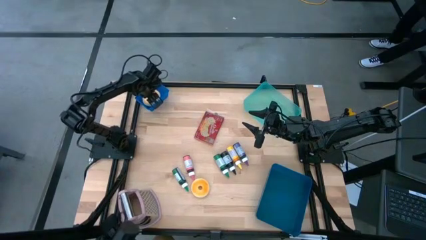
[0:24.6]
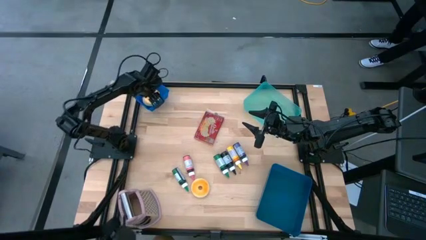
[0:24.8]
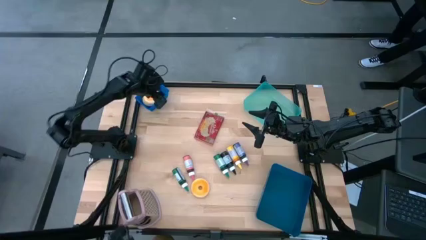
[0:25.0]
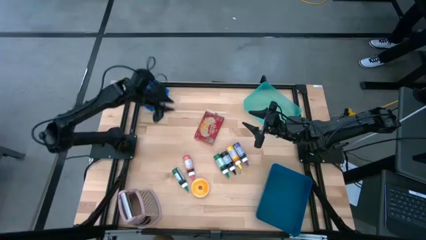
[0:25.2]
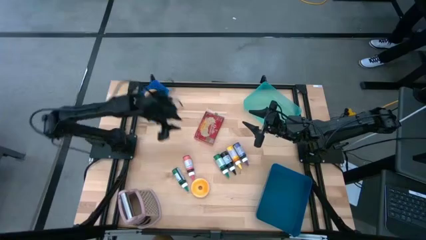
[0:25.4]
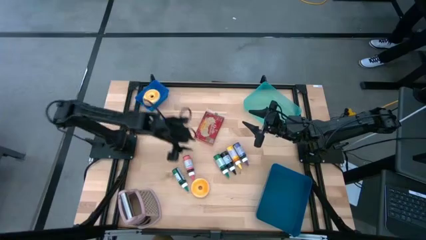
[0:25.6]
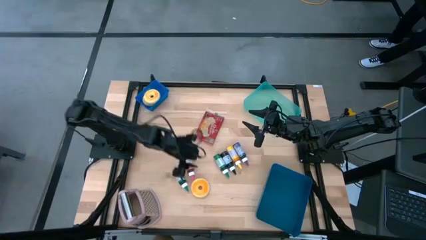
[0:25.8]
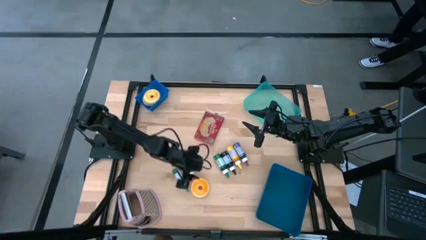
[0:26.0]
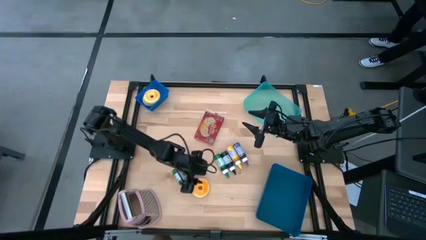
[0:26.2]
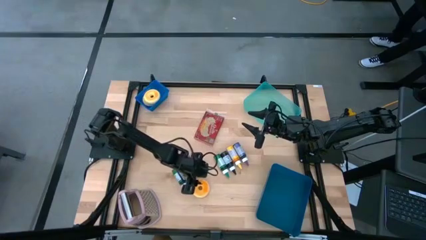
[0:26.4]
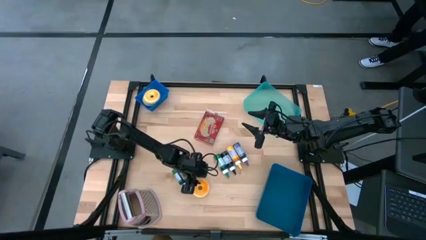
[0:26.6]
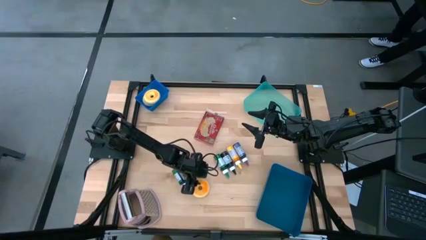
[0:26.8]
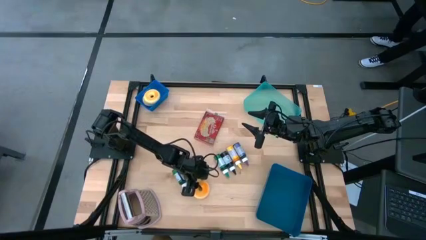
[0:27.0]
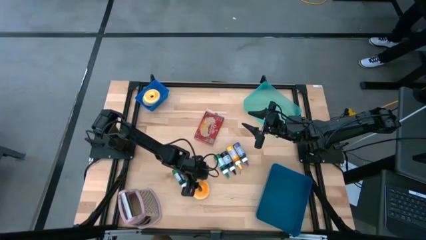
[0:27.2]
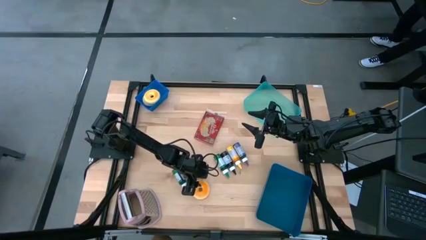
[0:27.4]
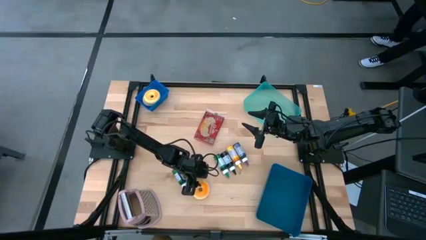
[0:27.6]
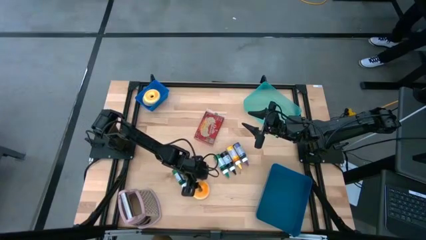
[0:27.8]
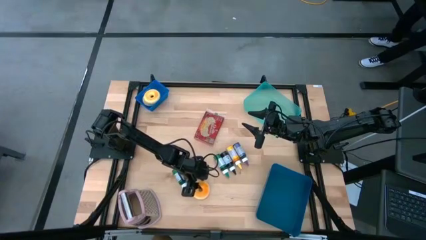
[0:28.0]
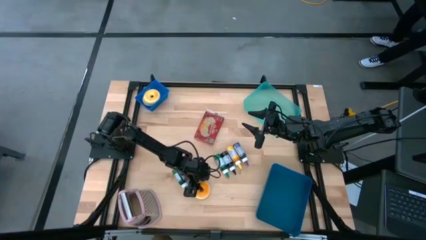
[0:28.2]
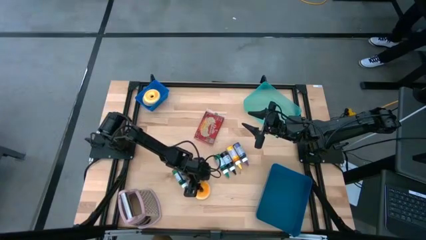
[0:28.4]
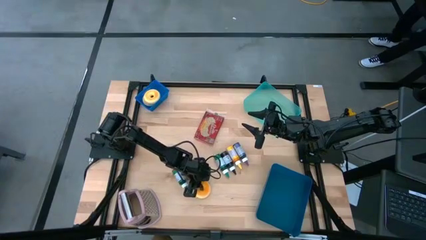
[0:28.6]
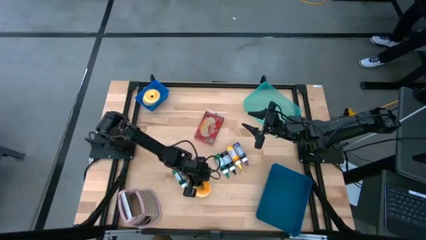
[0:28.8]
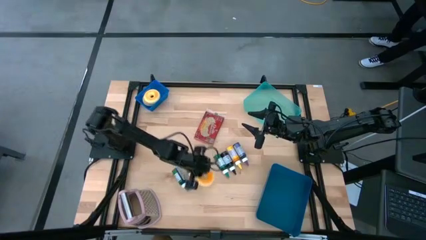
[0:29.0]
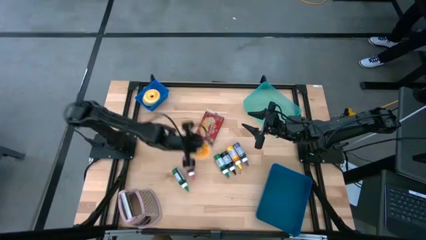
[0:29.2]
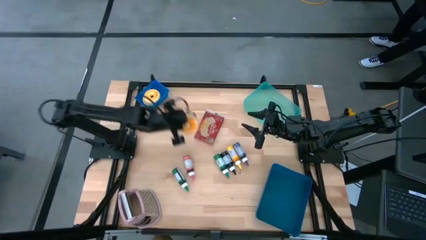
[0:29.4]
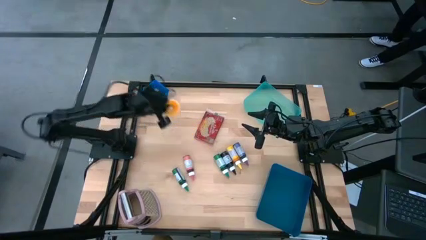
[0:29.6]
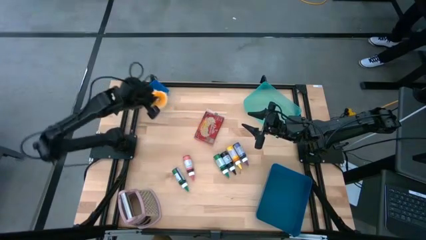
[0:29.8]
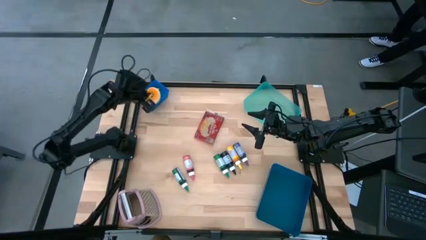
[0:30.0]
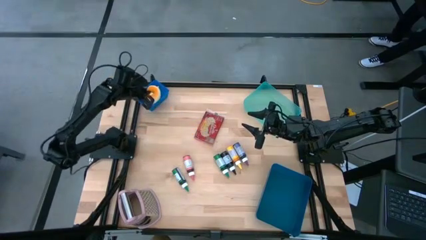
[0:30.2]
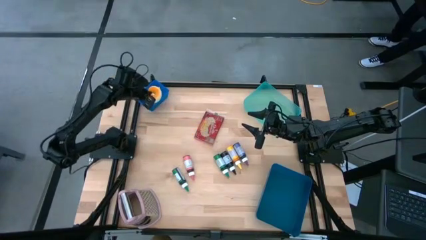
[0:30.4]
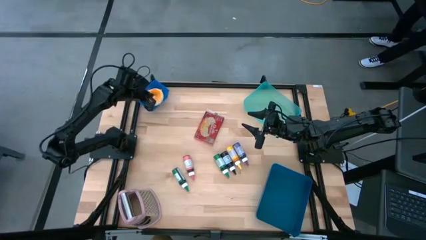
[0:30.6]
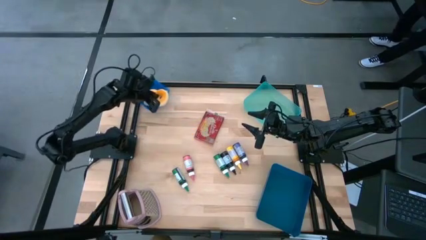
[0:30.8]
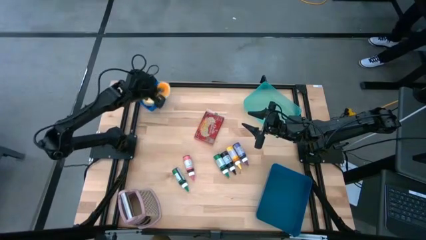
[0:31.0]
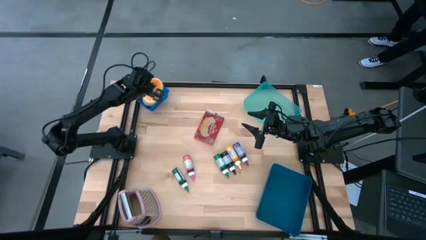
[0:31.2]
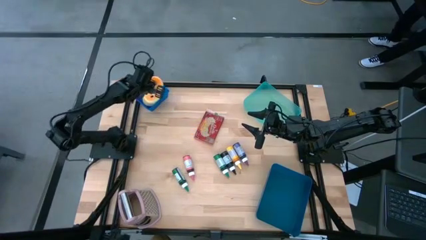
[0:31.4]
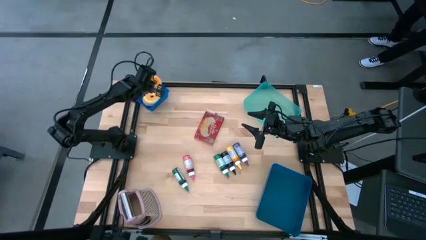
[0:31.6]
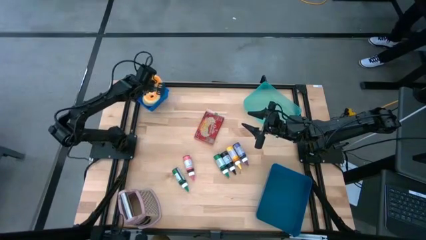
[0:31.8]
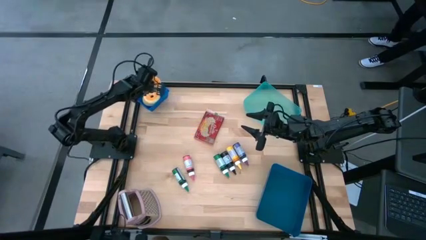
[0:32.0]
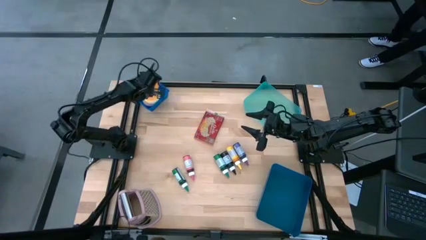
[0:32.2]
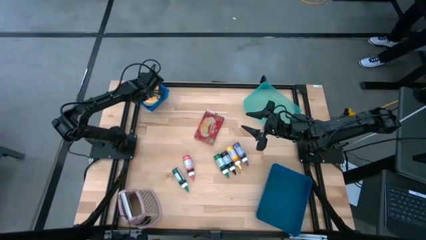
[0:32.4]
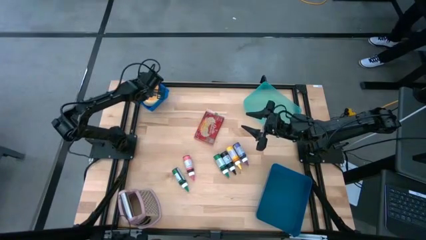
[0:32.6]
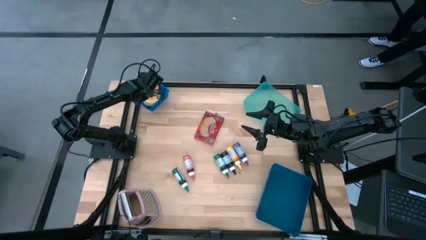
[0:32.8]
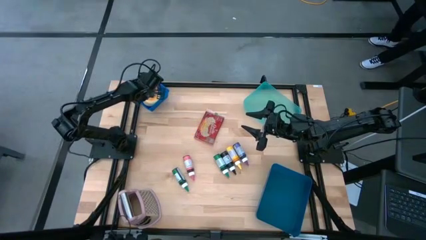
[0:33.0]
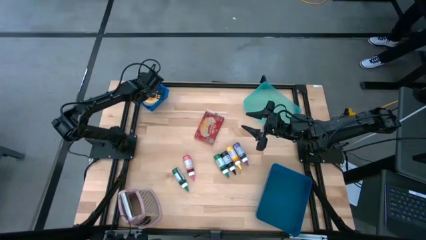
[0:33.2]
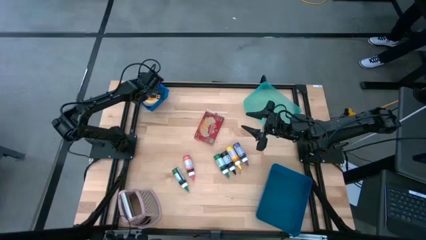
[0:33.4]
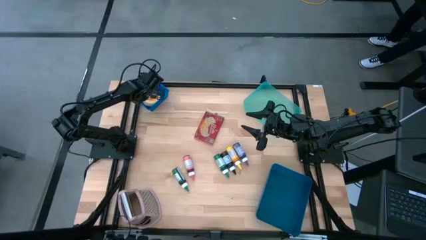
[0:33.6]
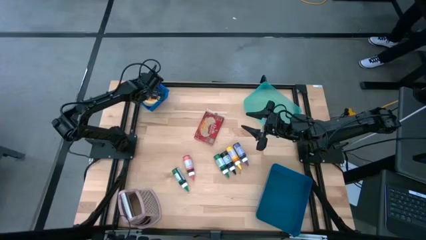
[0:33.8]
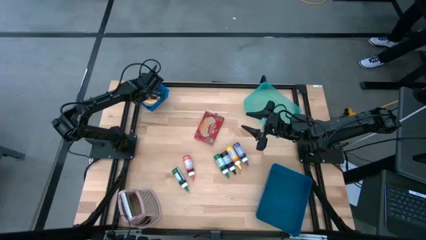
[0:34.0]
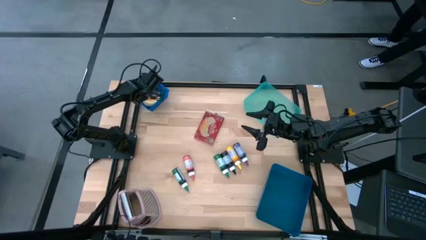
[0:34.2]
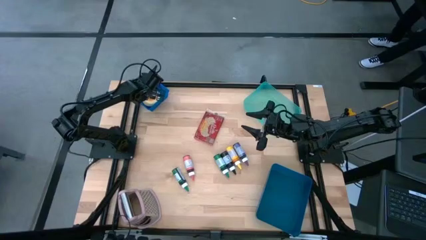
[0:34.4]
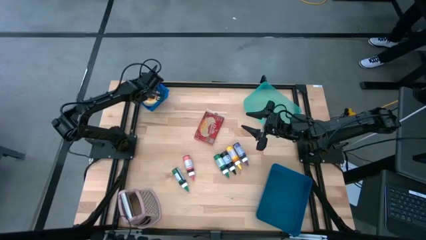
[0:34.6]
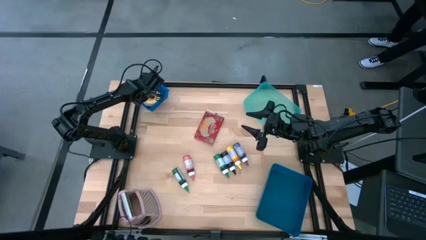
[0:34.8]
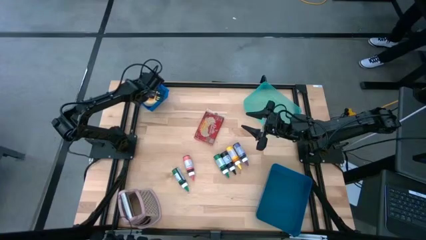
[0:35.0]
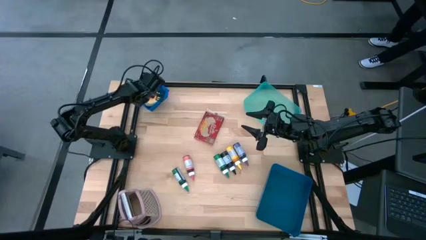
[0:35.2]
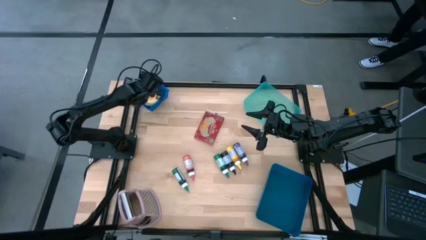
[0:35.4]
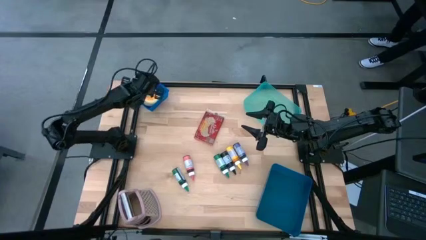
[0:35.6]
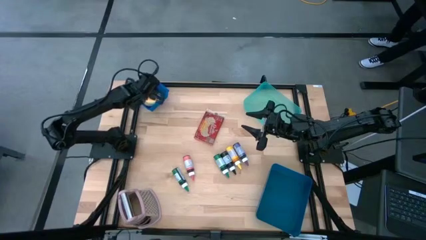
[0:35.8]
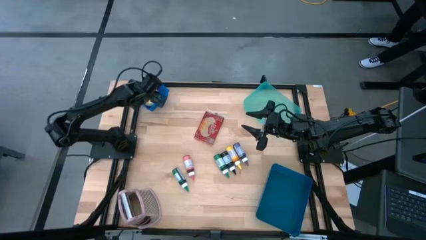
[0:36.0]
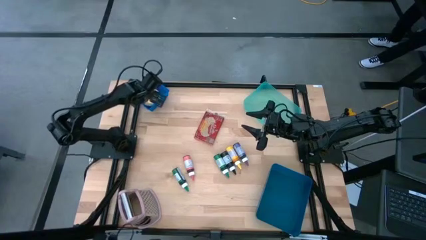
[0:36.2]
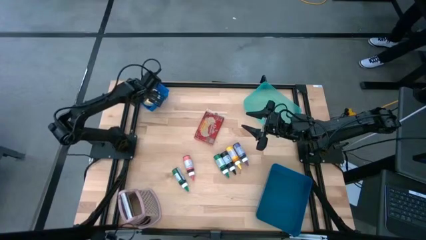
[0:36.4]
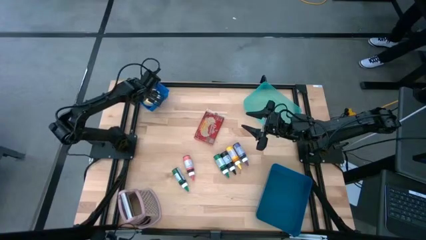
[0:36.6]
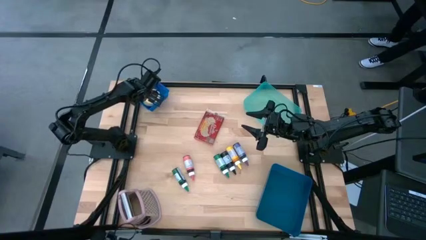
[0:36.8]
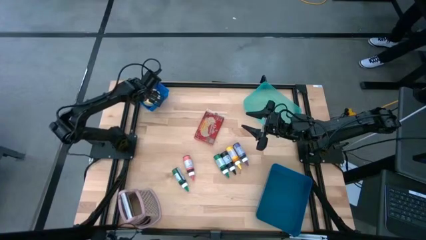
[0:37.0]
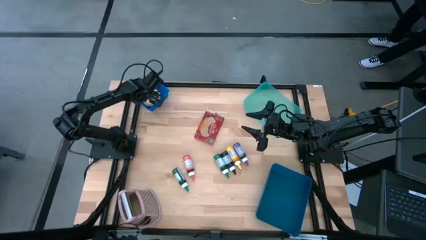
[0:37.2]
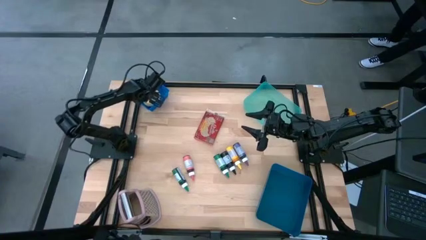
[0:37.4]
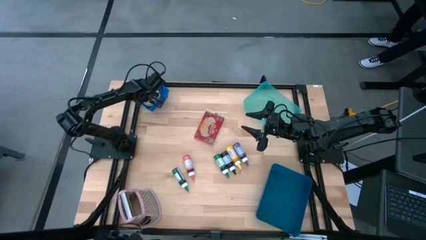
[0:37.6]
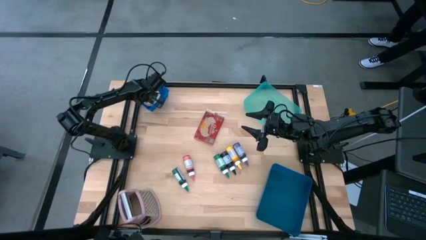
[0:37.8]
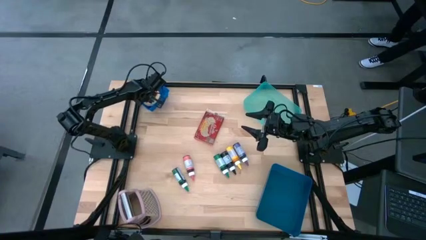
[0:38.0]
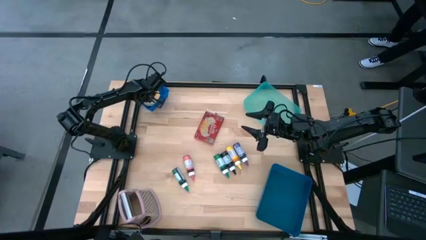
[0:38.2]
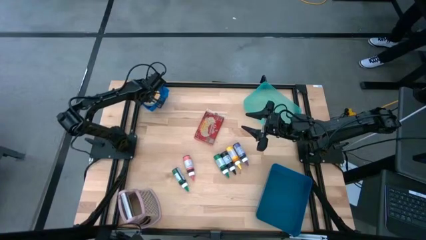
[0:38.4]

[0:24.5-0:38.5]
Put the yellow donut into the top blue bin

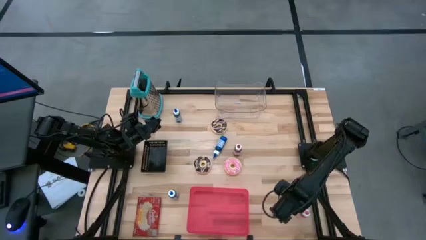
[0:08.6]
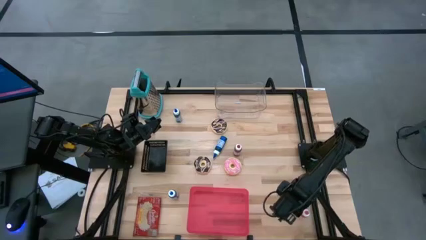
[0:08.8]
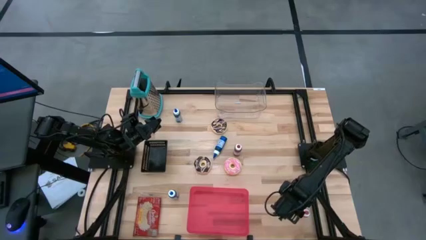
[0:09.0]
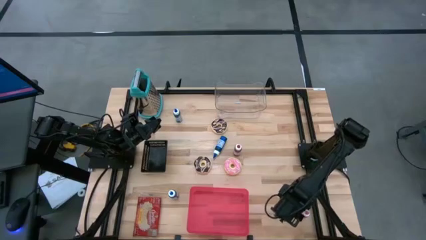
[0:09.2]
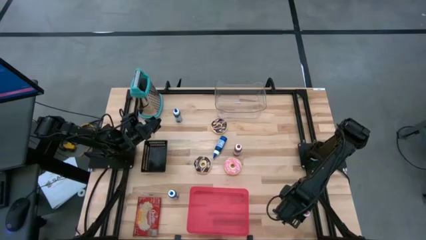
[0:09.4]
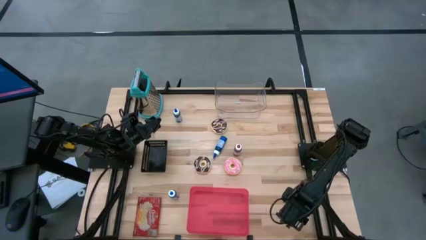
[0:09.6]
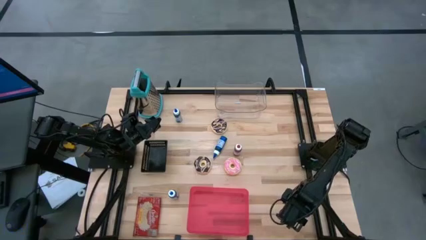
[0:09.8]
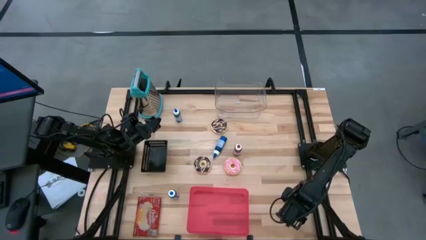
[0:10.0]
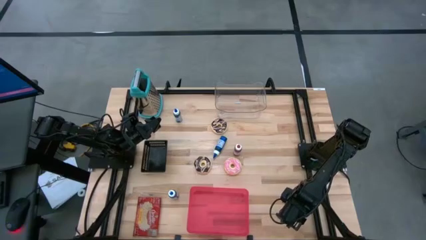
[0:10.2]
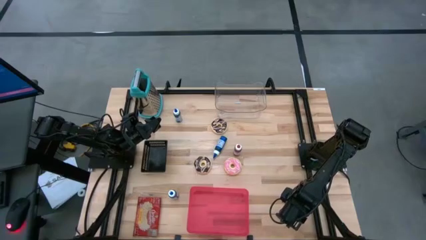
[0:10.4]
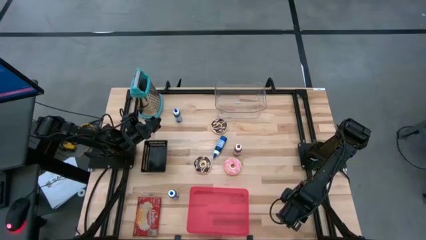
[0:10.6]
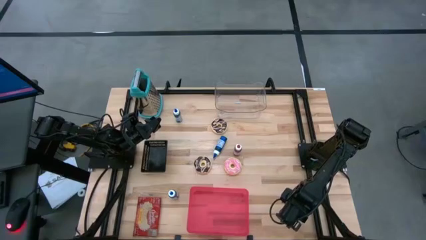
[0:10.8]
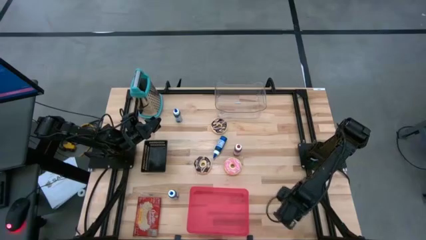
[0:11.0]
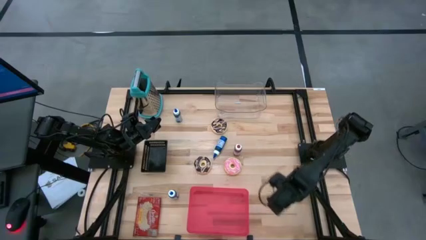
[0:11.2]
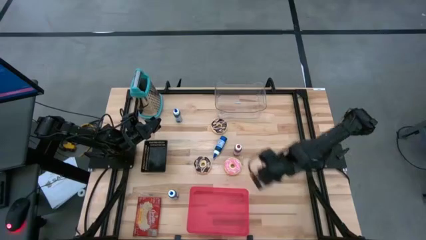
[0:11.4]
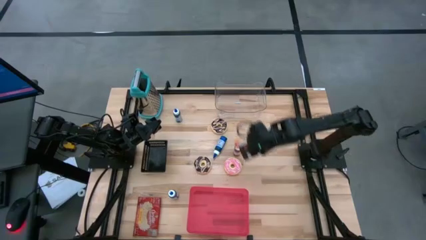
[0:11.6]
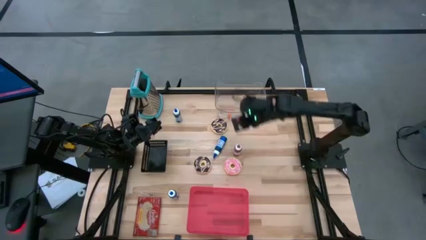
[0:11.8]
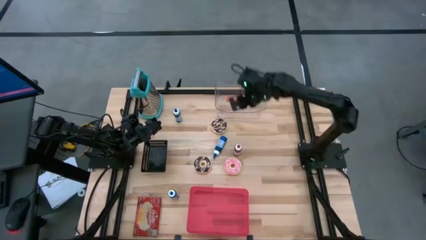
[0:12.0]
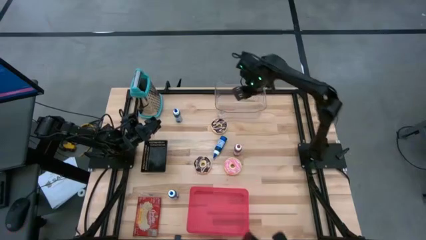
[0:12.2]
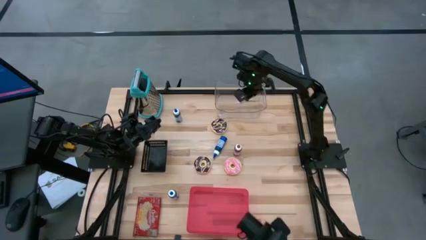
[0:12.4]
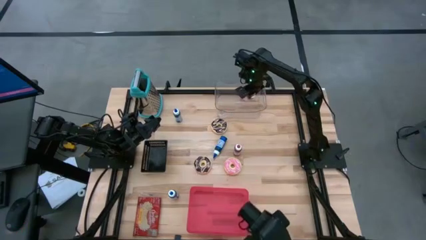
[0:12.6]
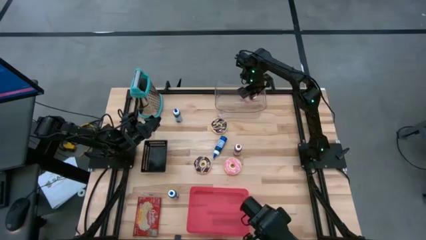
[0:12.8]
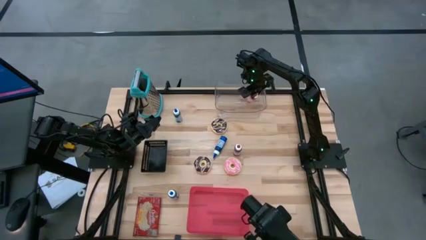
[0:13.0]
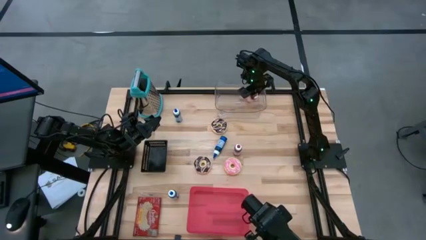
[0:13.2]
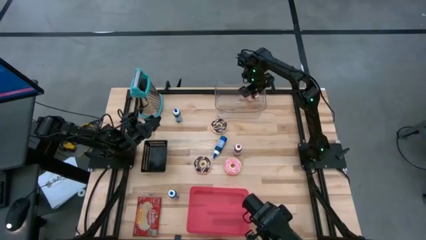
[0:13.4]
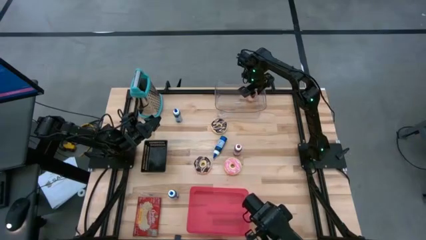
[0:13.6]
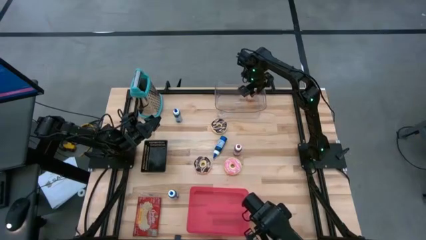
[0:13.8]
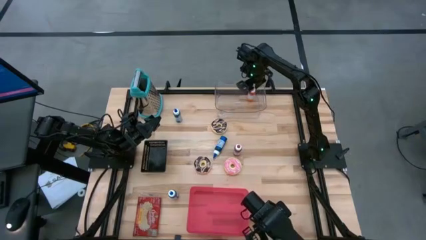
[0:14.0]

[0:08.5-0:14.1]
Put the orange food coloring bottle into the transparent bin
